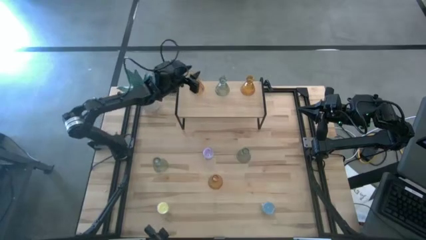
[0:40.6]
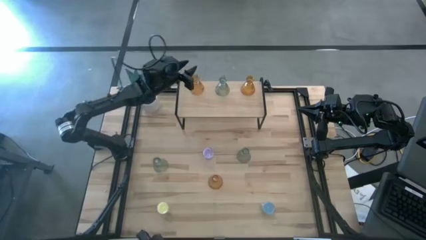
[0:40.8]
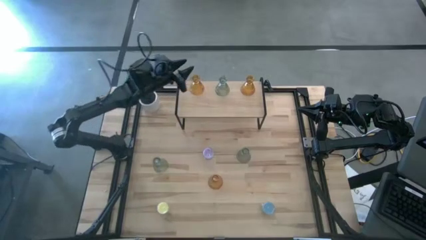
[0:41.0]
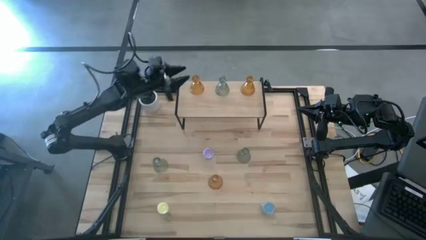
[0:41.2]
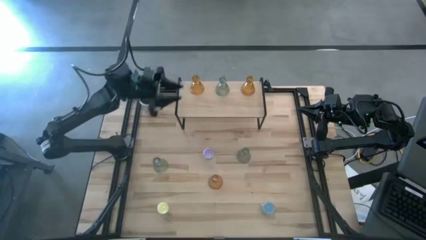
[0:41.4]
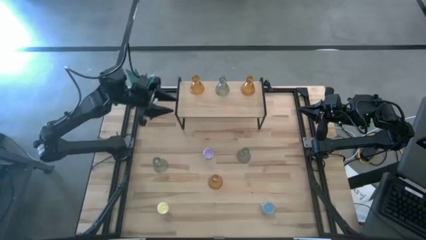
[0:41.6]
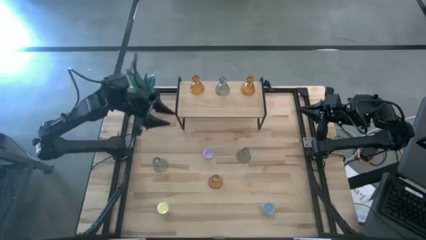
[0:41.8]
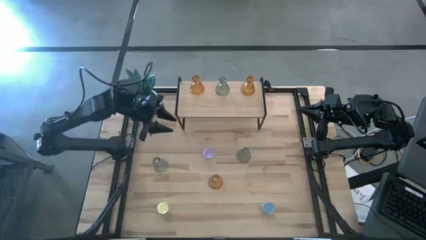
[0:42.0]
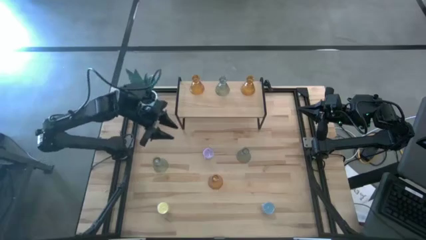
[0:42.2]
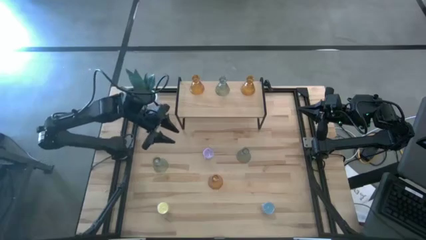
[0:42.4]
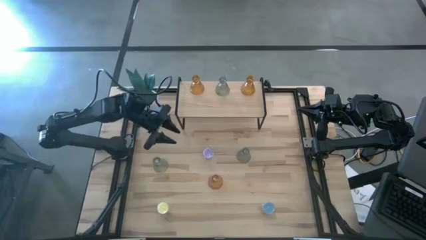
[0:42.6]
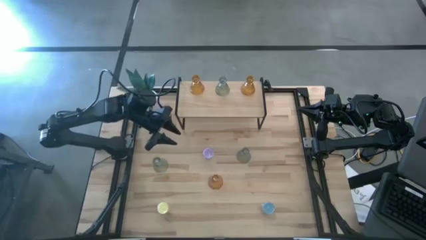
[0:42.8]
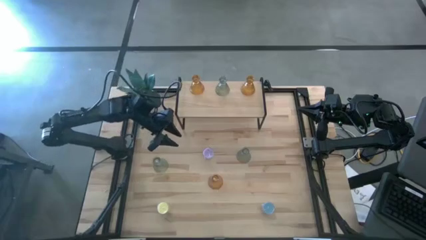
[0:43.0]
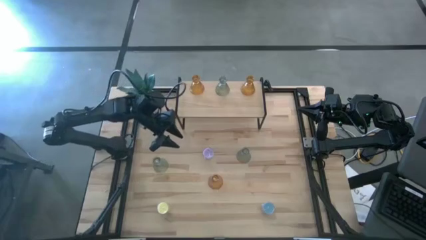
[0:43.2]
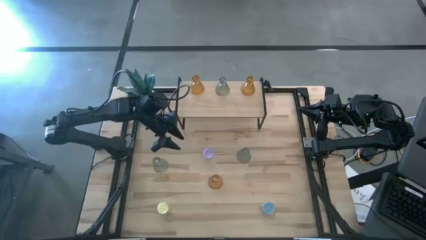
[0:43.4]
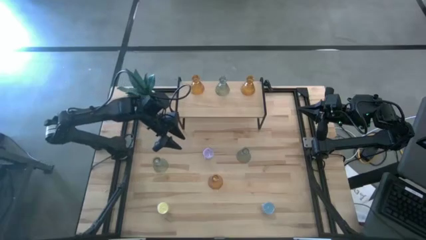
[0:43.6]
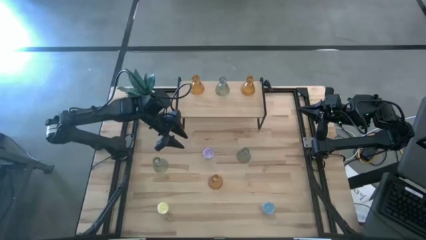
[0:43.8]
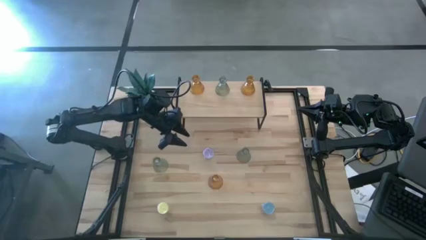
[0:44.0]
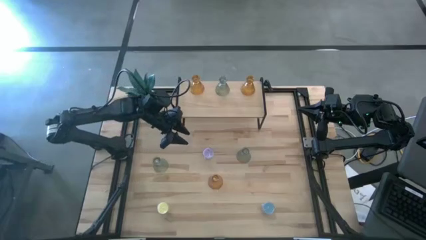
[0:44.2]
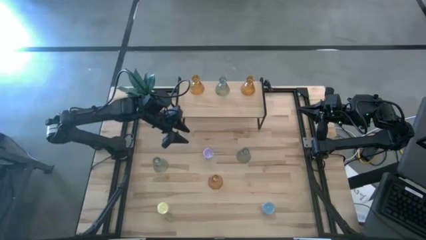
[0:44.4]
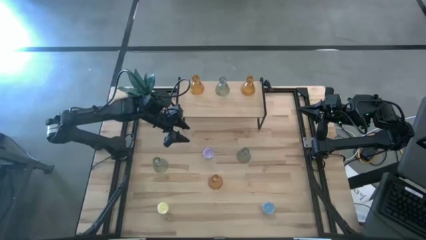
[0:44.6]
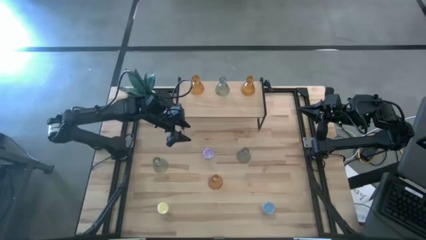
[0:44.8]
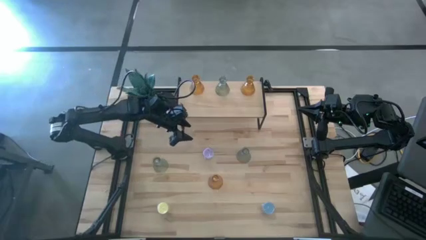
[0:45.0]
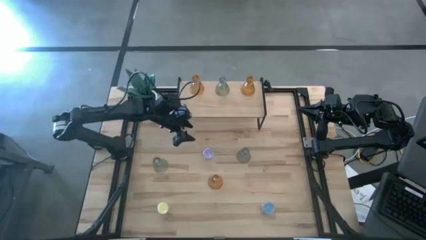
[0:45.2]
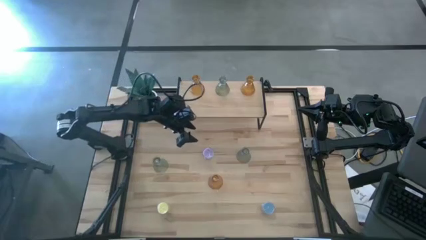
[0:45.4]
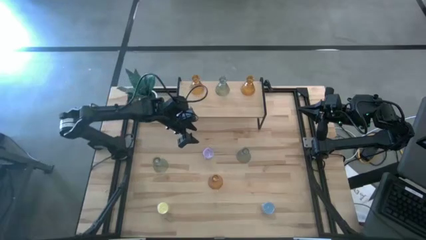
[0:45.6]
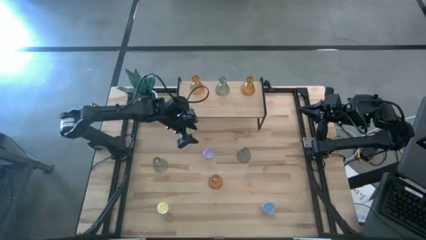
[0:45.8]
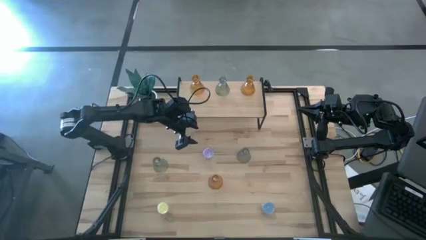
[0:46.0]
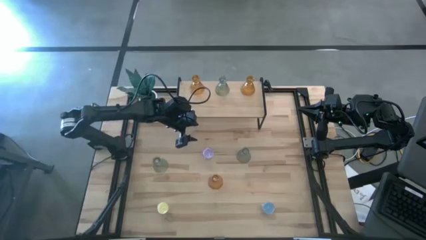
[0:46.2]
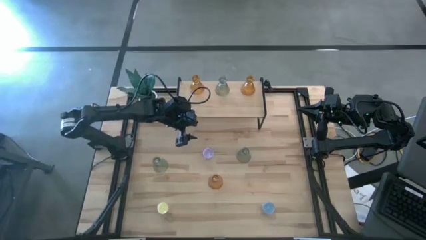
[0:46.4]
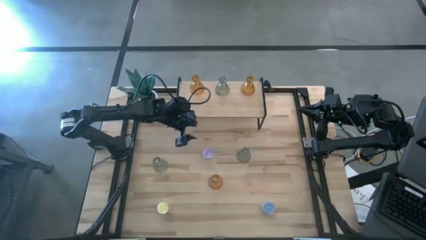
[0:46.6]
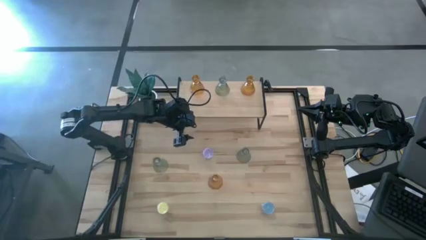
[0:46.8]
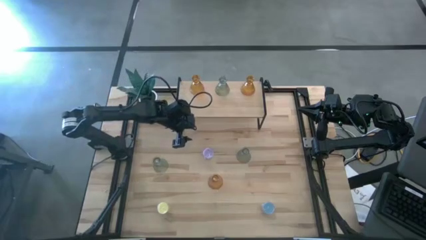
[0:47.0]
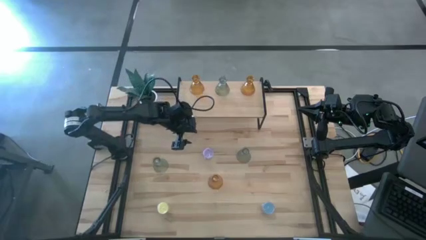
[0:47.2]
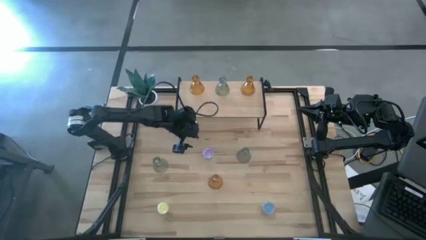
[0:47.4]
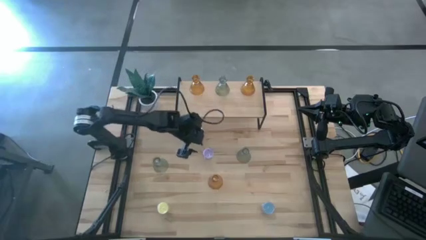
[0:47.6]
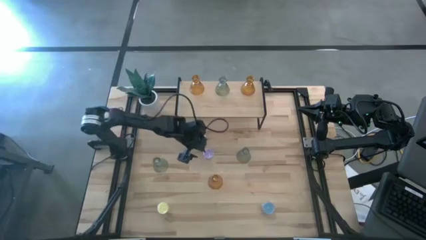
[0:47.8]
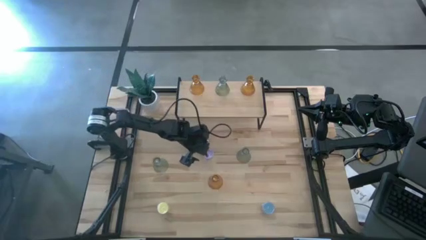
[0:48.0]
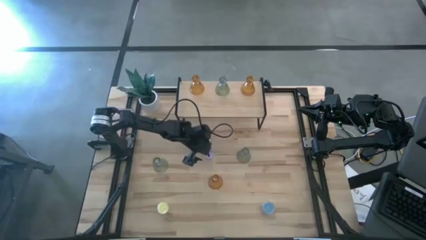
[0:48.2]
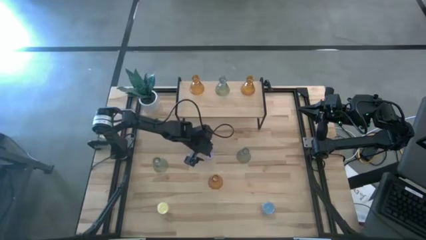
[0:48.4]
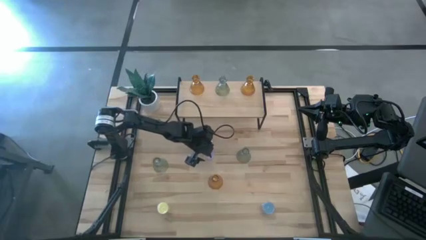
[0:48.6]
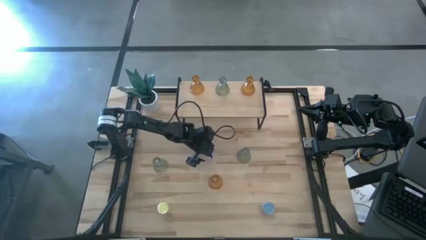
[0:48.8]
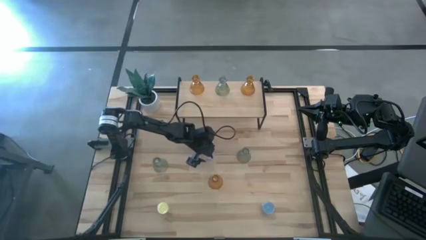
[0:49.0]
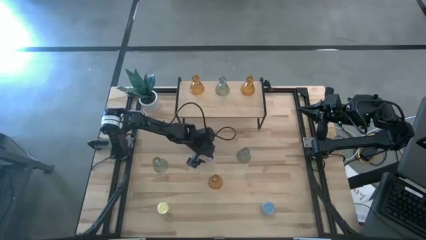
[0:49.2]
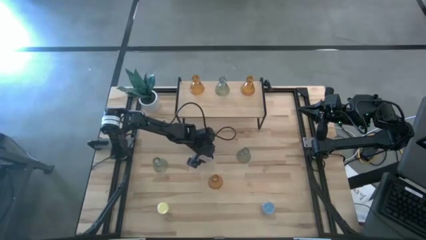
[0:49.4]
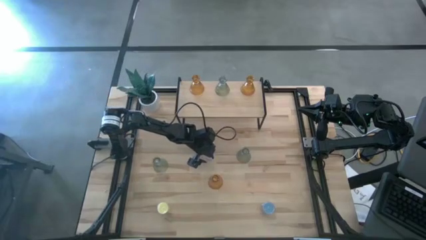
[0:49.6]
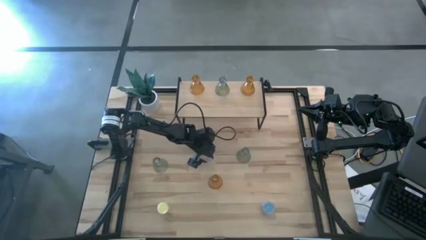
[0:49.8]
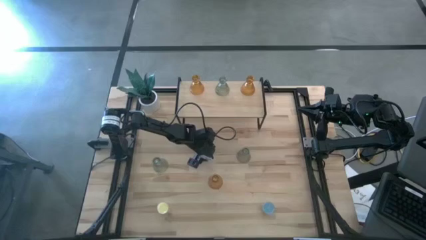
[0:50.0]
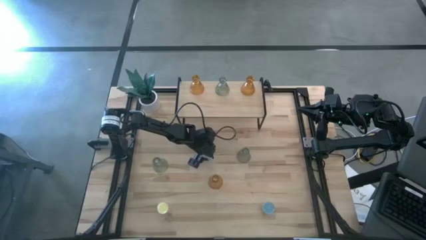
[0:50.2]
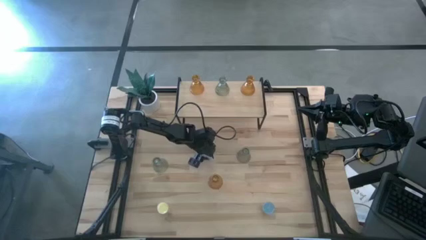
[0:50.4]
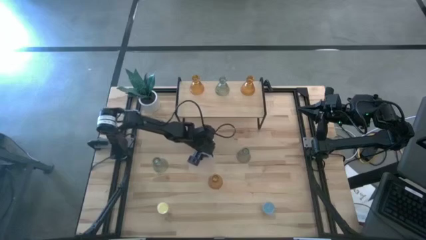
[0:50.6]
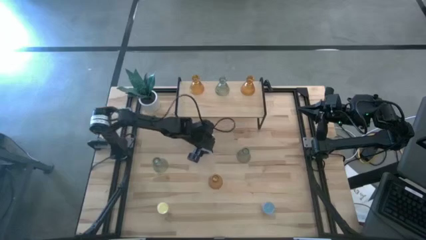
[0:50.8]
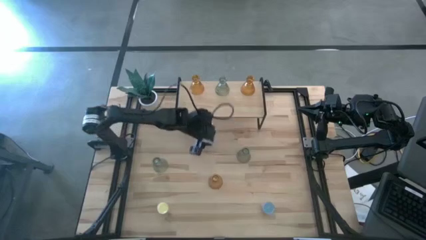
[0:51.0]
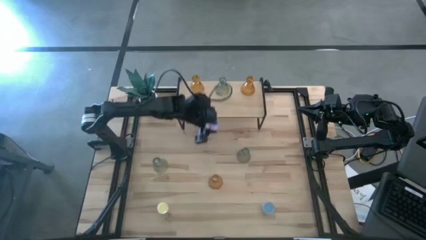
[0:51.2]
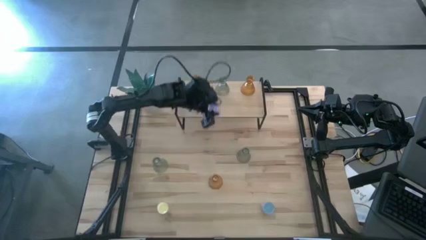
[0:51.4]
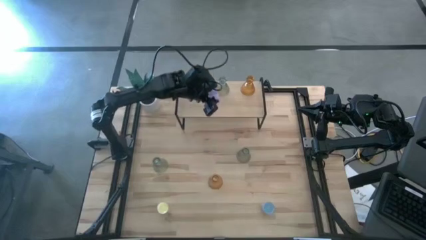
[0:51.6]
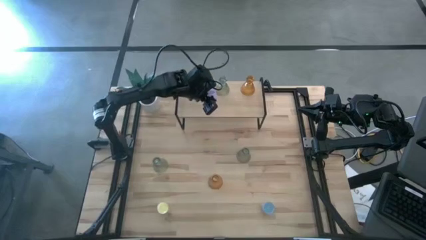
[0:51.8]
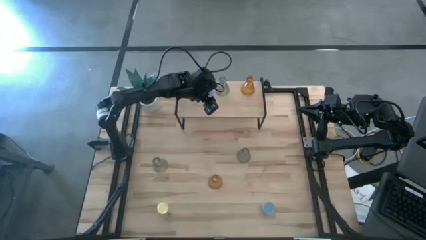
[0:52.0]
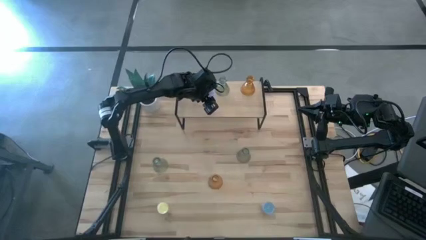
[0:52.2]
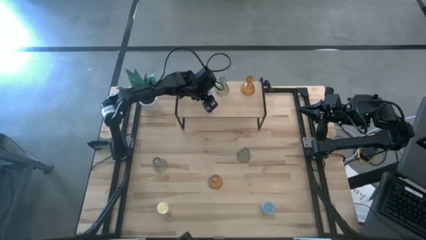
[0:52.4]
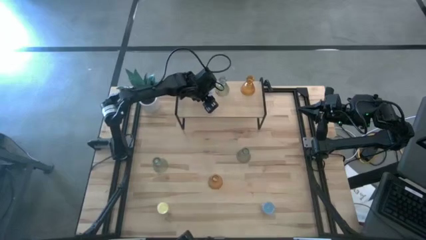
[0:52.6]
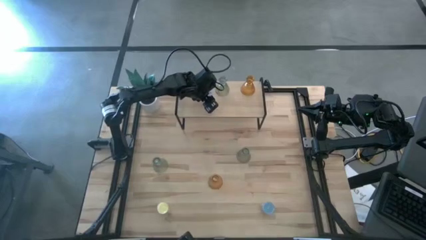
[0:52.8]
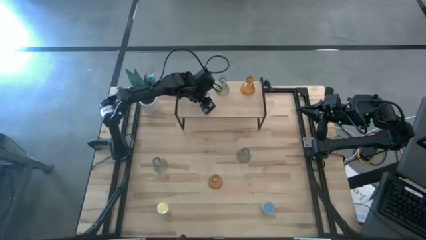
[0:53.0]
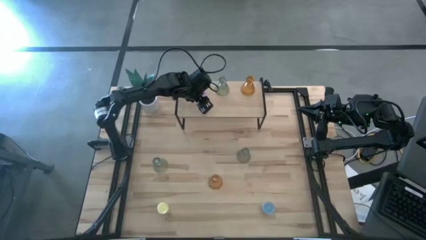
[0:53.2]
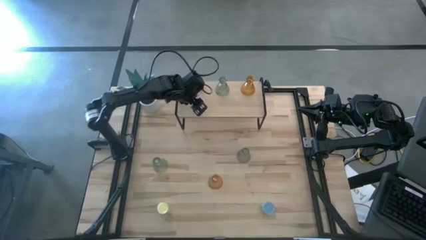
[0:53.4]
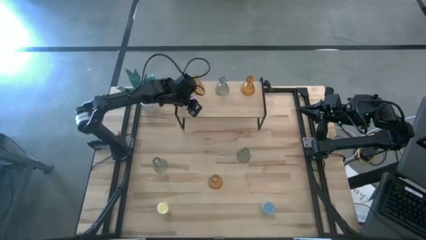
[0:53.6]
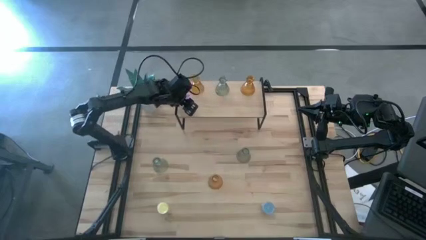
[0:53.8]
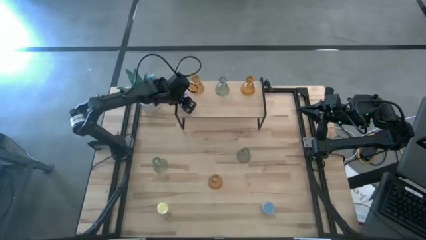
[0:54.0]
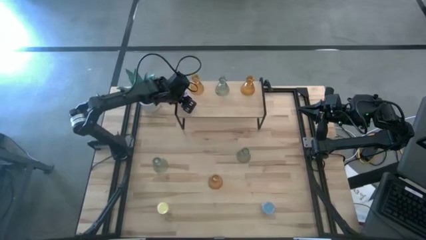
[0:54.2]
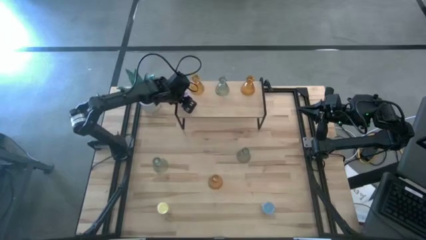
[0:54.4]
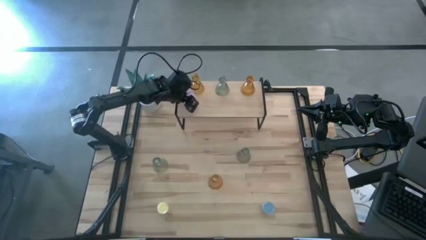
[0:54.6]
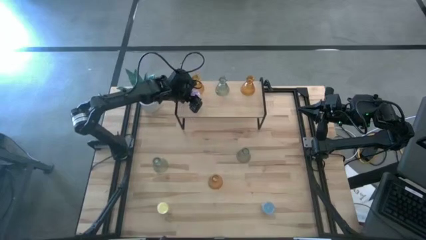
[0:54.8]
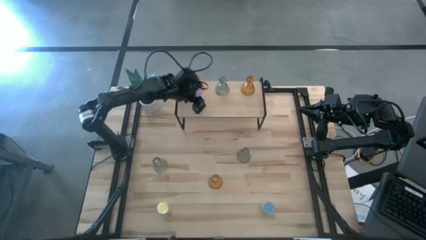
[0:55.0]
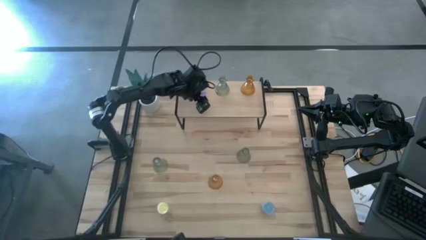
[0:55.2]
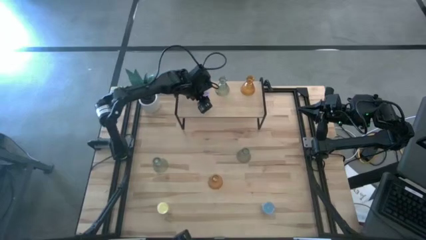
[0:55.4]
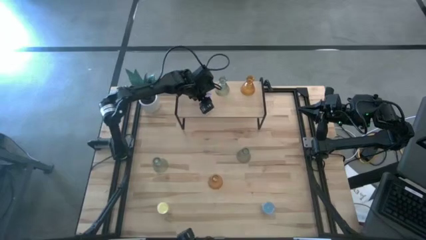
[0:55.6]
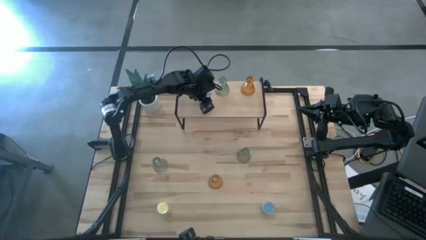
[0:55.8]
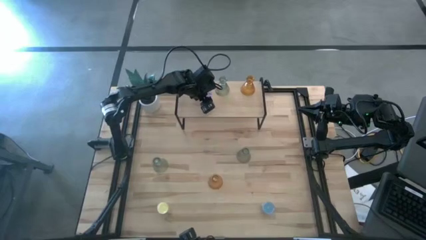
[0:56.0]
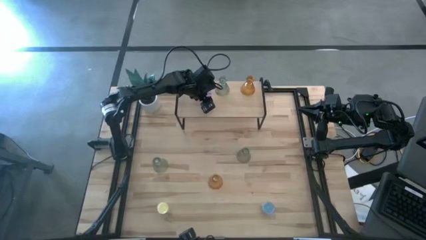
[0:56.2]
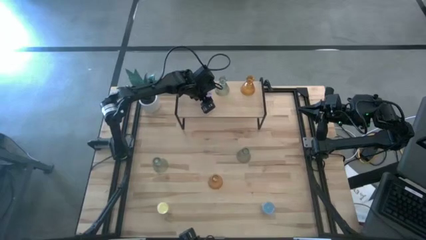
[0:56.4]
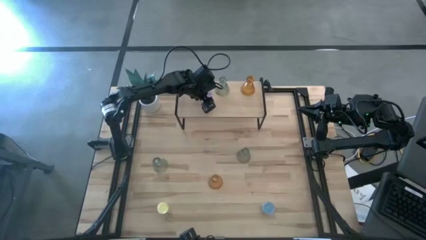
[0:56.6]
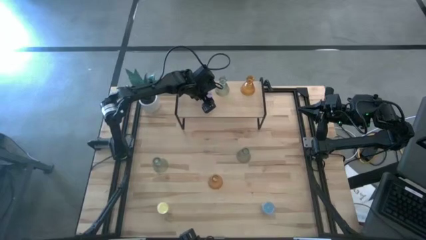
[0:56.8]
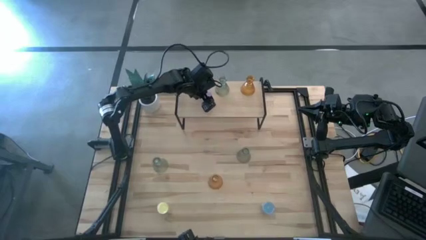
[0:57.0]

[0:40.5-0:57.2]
Task: Pick & Place candle stick holders
Put the purple scented candle on the shelf
